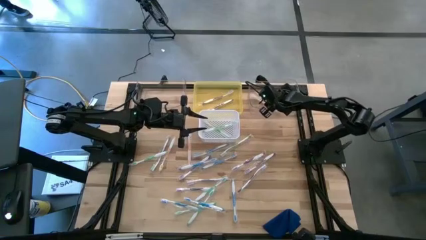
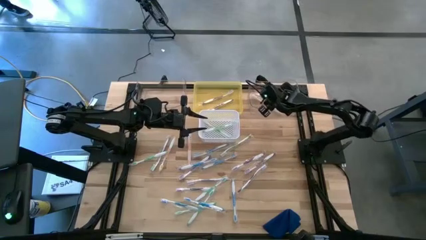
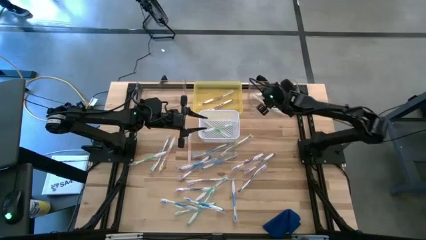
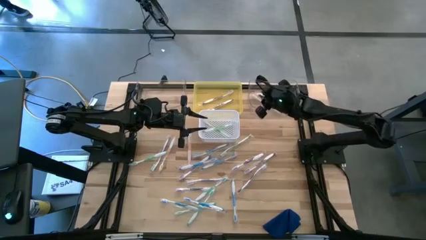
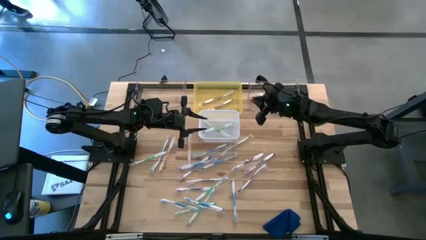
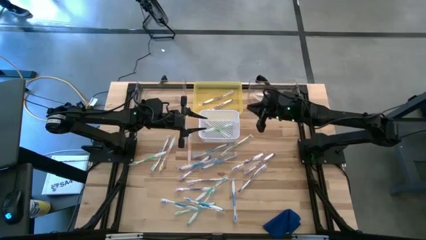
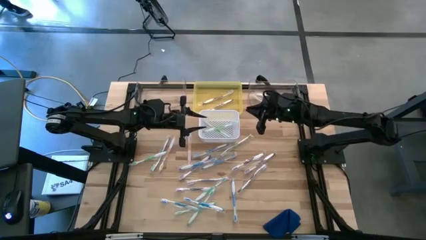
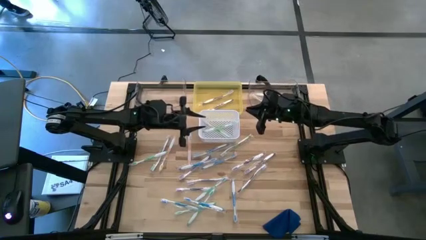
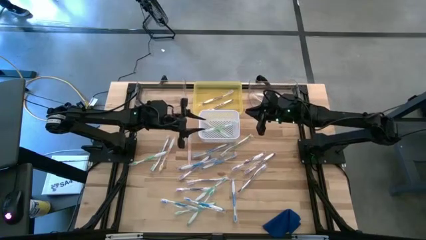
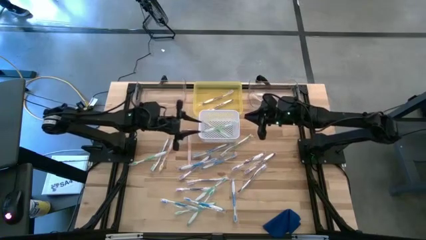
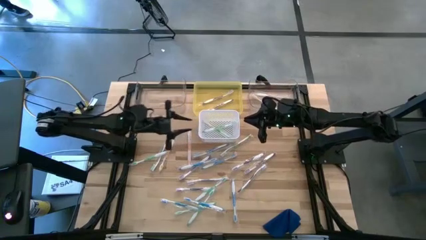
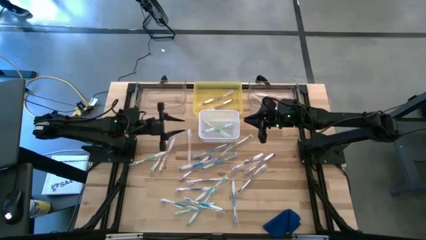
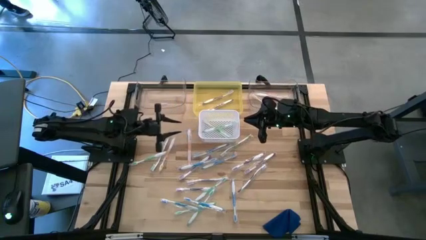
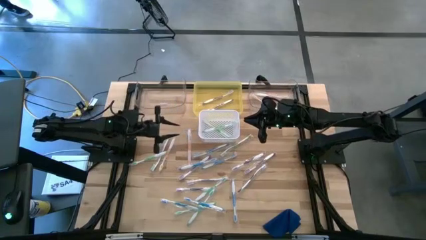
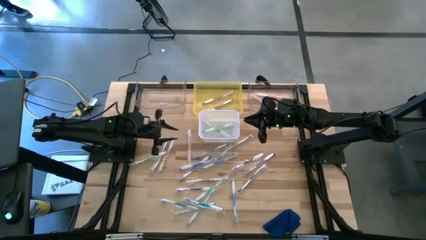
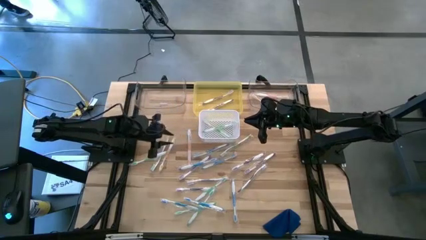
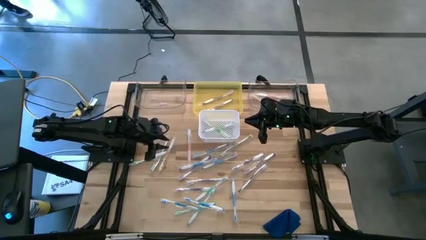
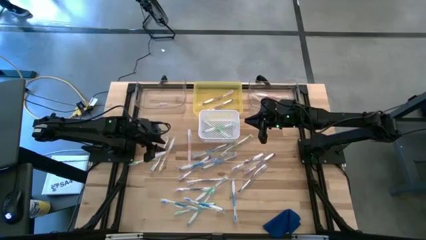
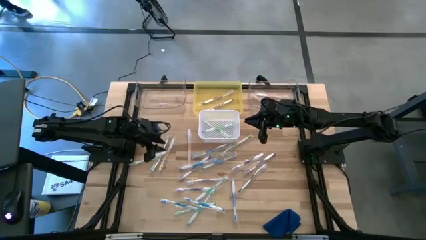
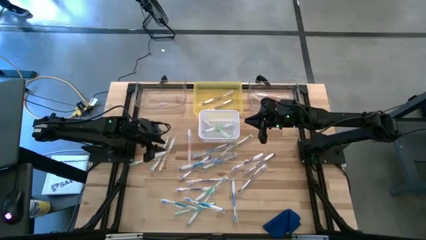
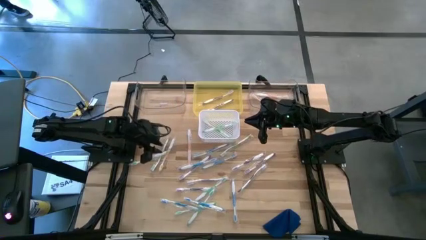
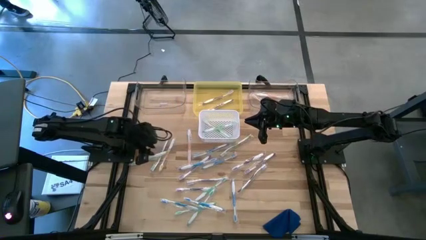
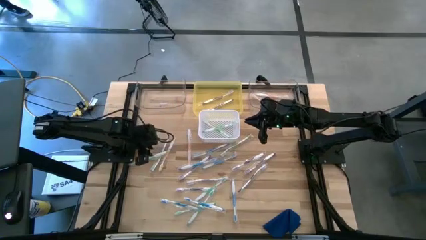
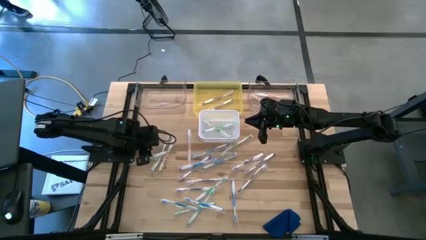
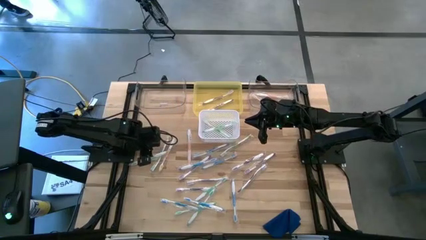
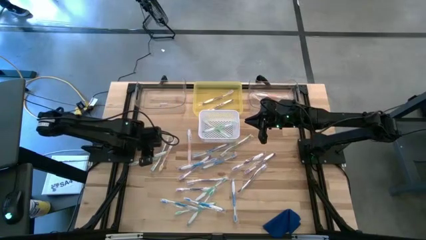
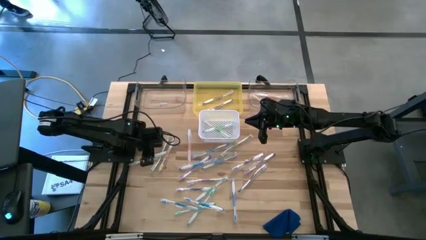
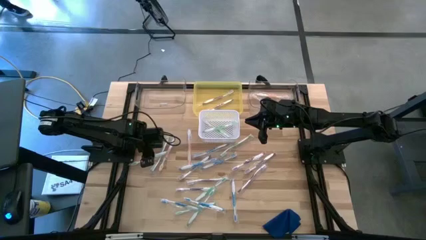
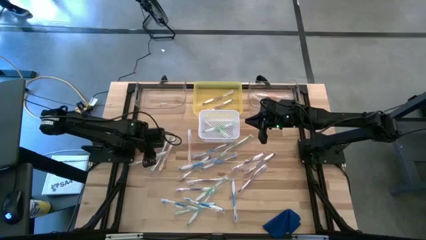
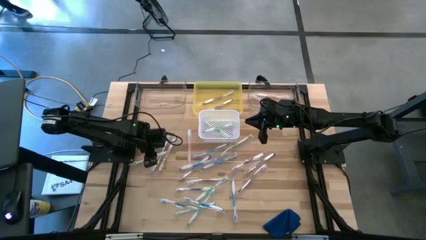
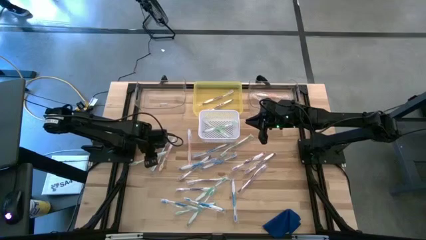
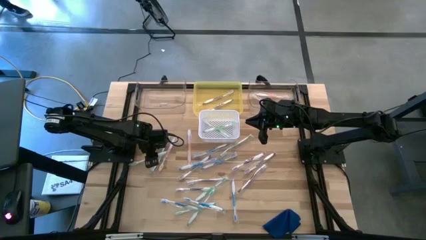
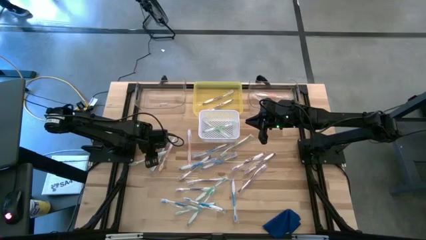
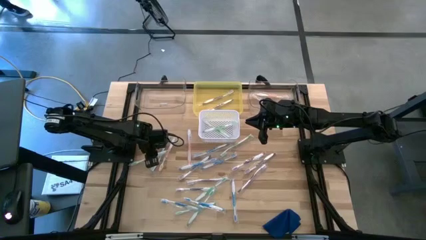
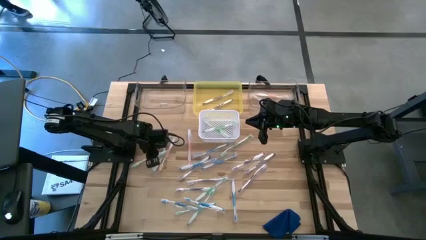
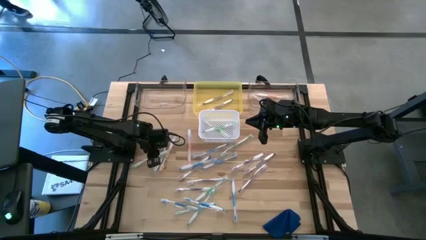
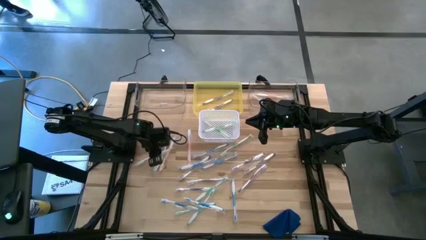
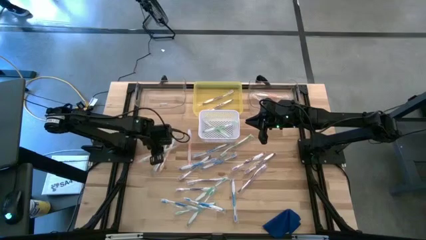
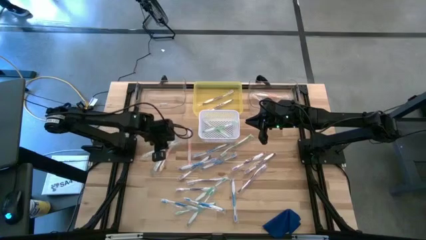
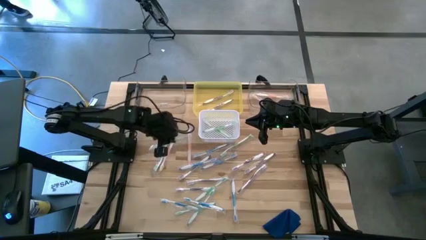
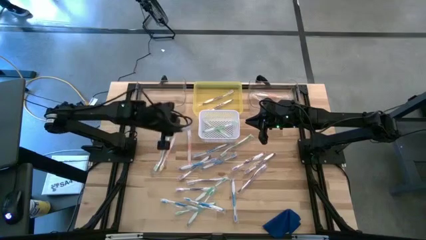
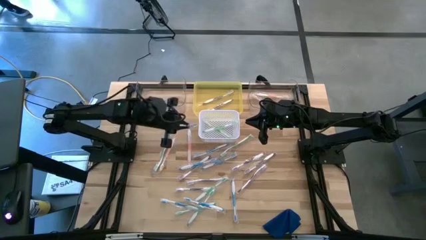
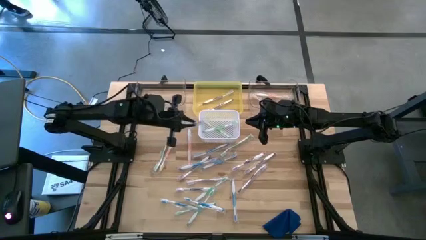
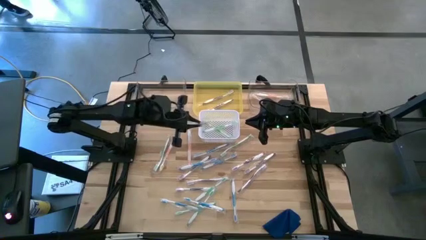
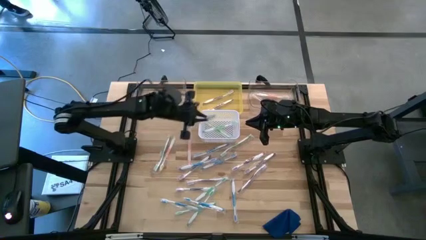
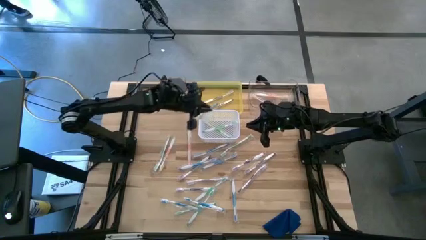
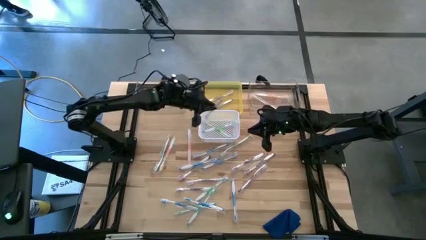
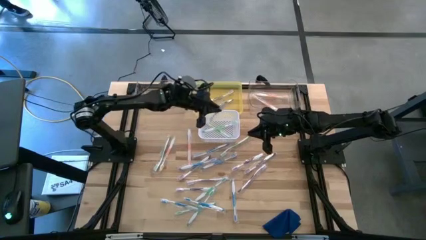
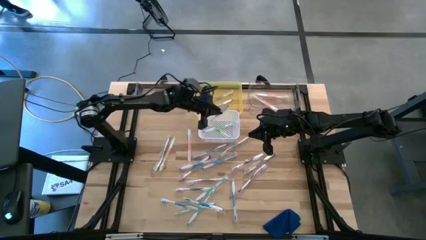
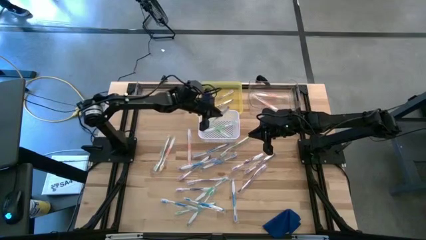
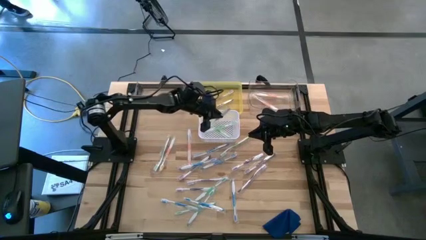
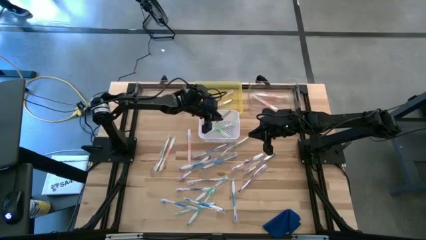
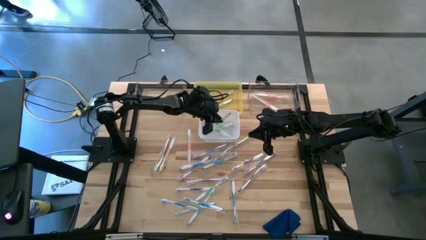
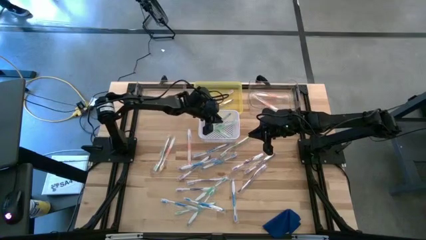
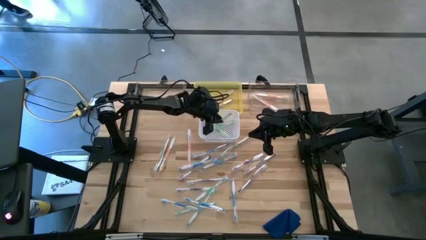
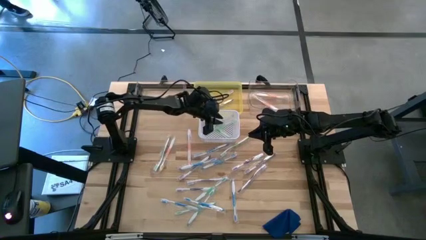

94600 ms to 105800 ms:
Task: Pick & Place Toothbrushes
Put the green toothbrush into the white bin
